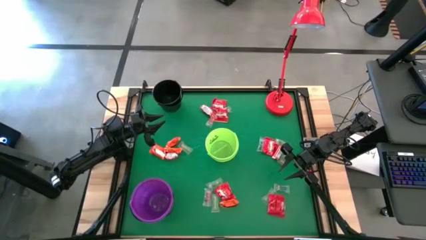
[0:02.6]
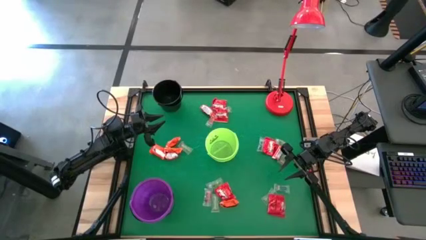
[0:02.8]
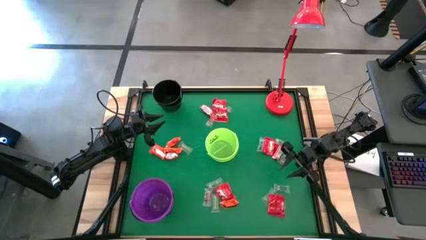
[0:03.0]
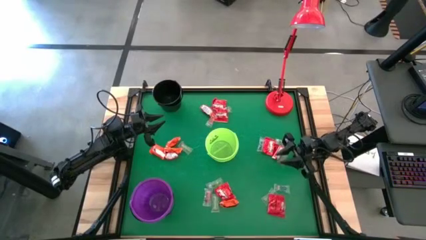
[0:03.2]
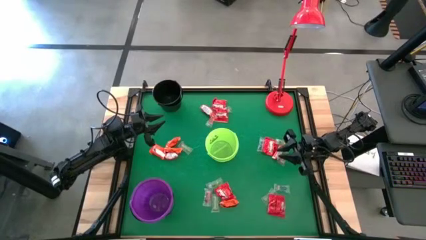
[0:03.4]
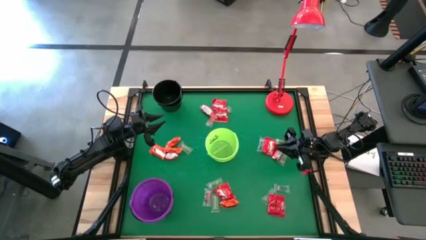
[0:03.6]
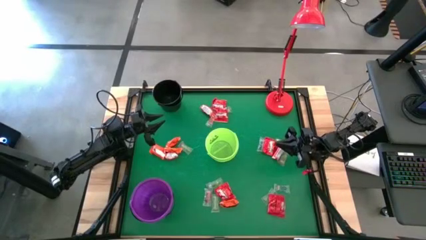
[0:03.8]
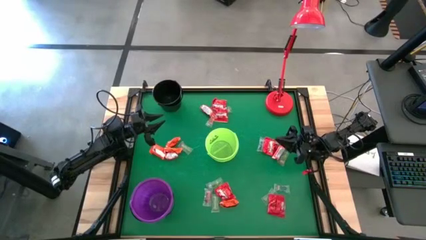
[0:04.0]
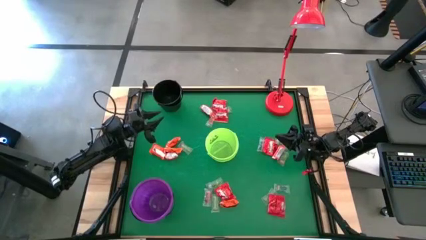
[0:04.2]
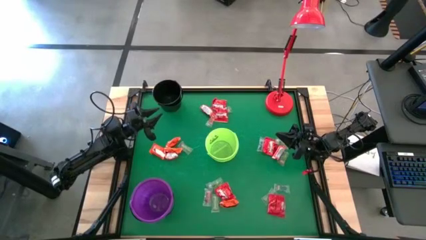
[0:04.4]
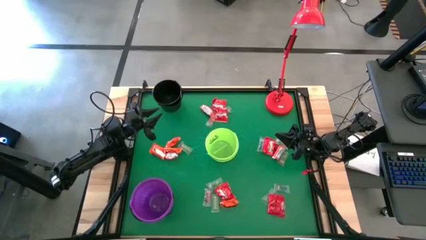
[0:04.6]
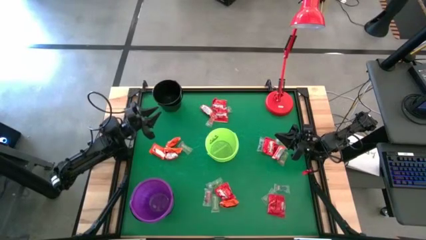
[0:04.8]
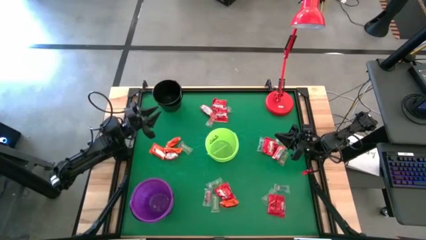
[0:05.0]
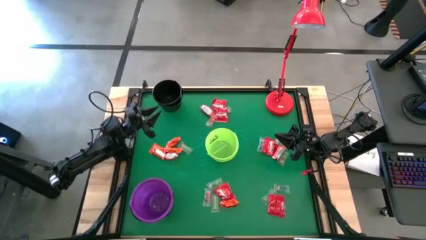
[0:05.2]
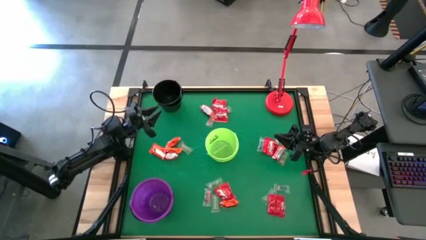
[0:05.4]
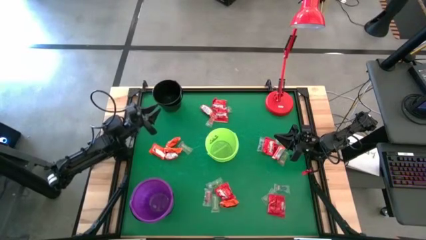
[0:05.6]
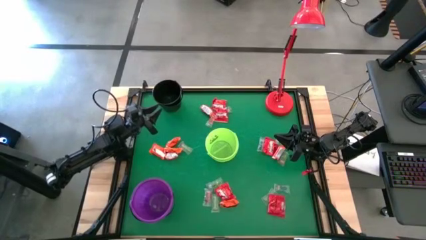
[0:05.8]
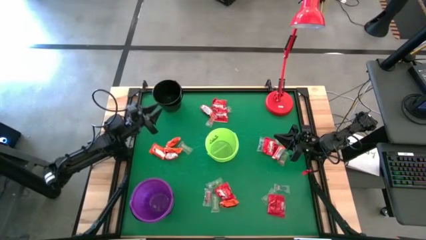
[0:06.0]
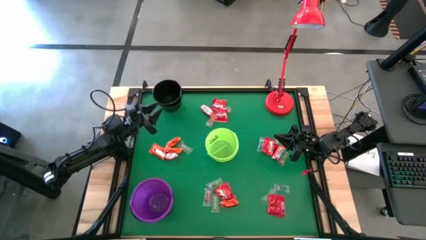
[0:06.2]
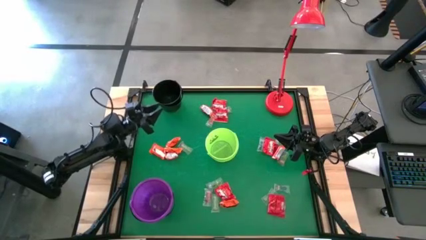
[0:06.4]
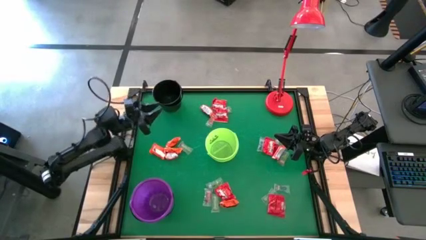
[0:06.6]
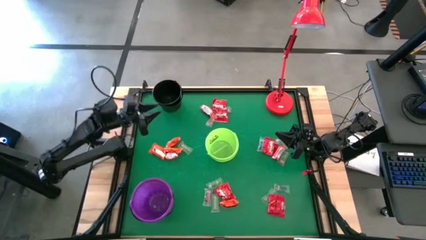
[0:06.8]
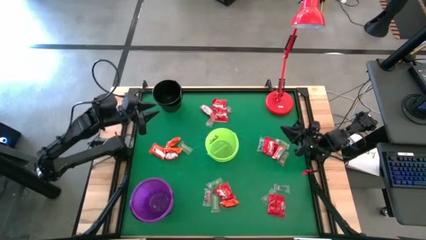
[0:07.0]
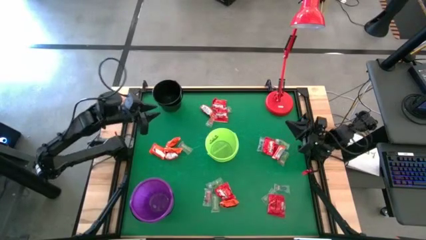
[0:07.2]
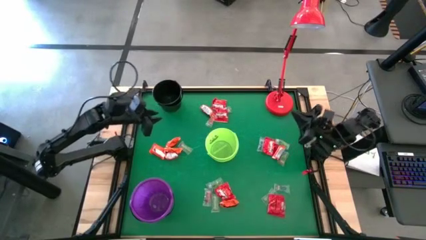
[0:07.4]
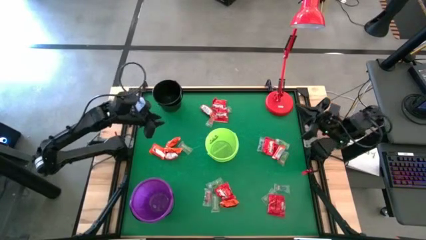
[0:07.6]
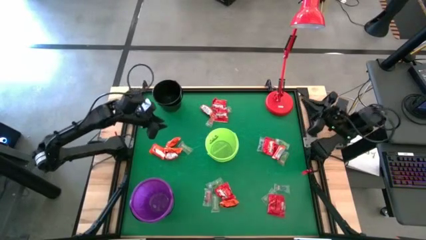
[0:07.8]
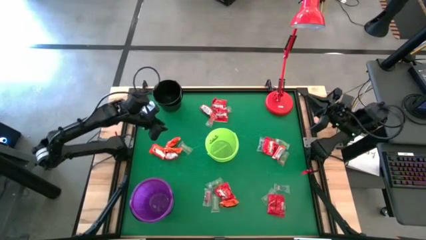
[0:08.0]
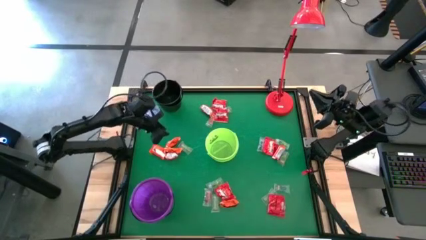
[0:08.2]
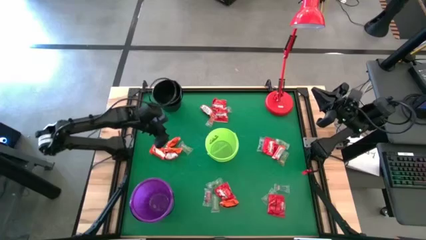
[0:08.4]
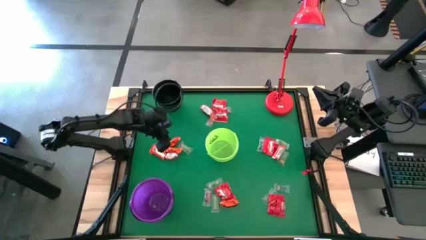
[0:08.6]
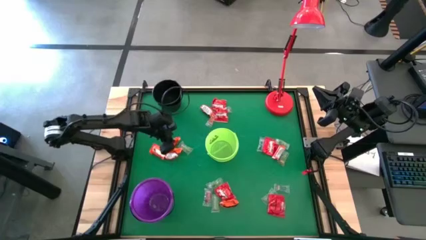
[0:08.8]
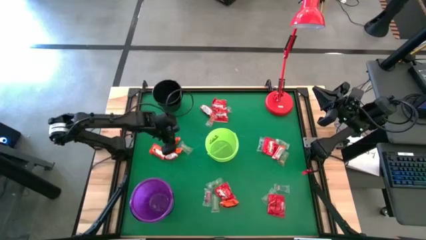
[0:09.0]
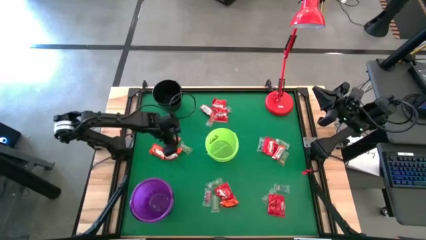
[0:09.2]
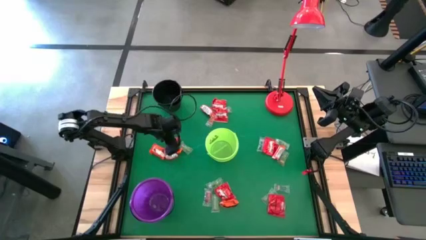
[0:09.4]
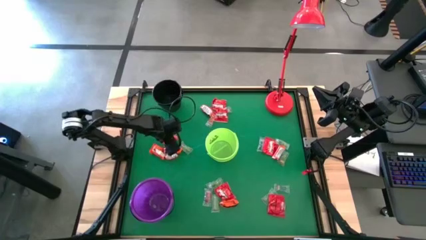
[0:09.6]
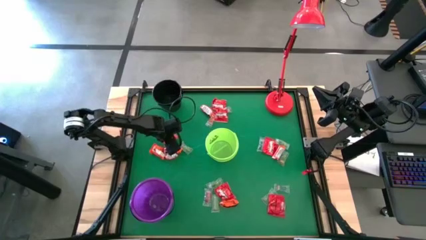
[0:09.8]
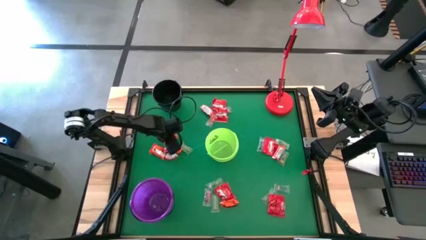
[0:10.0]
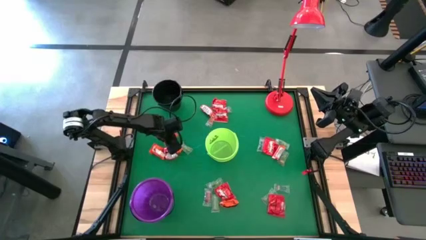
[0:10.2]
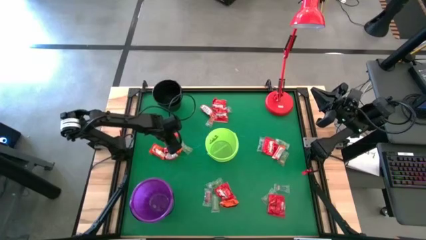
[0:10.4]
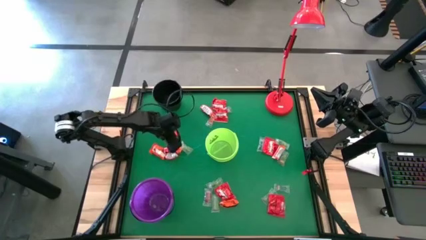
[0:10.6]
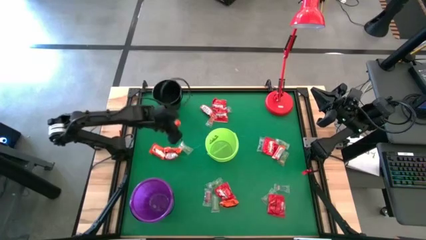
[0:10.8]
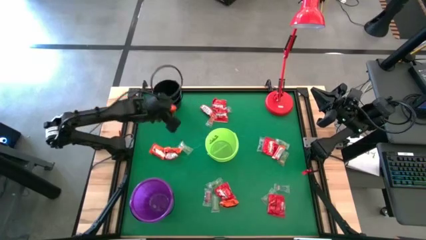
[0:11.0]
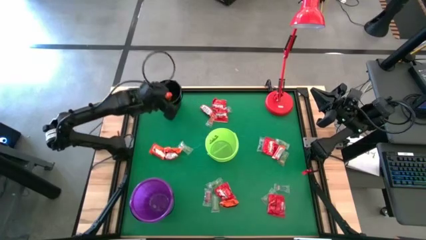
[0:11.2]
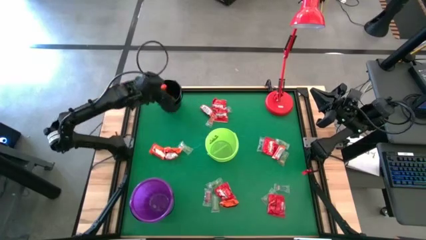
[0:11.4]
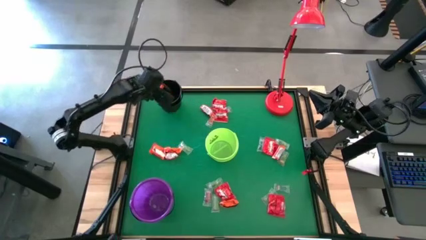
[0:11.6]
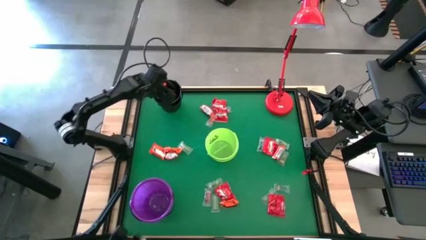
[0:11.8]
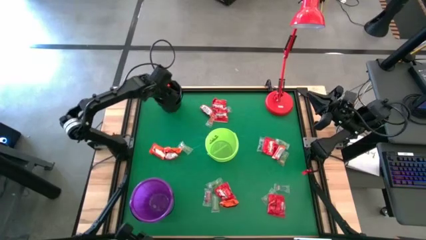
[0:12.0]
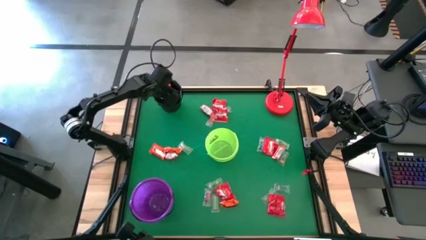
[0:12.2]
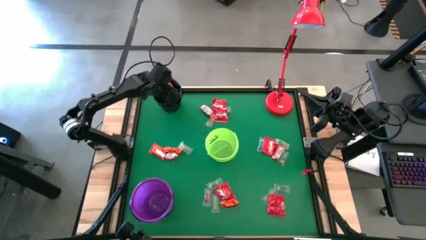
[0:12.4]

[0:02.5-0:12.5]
Task: Sort candy
Put the orange chocolate into the black bucket

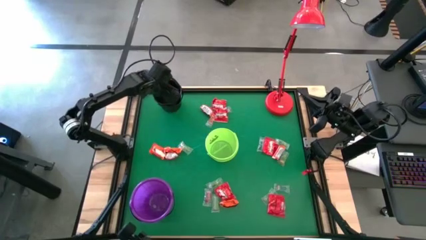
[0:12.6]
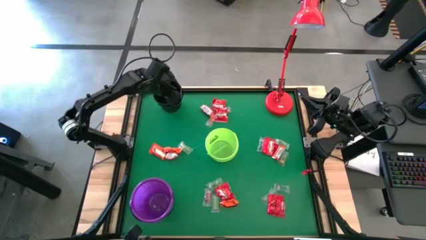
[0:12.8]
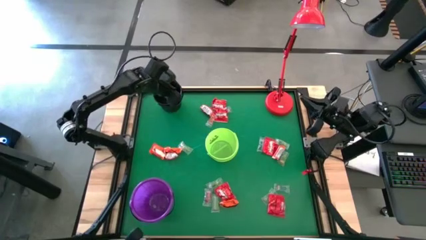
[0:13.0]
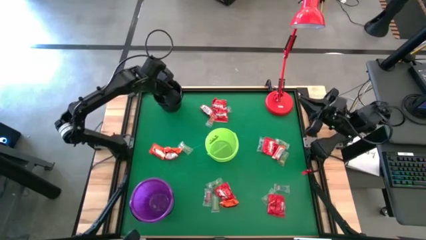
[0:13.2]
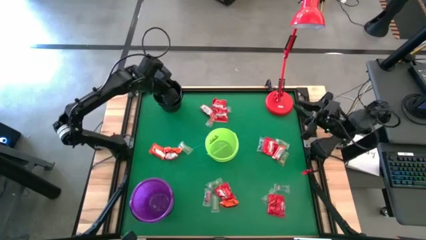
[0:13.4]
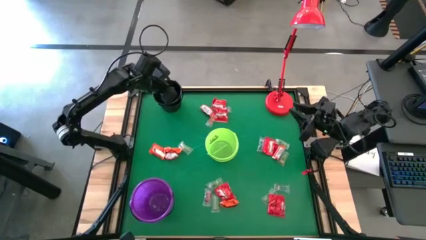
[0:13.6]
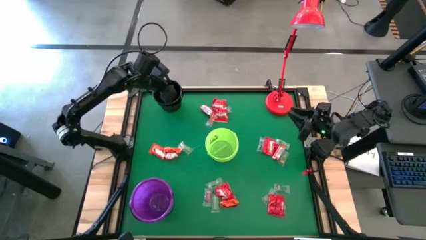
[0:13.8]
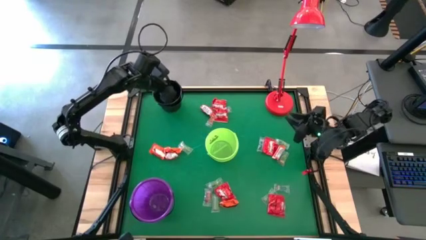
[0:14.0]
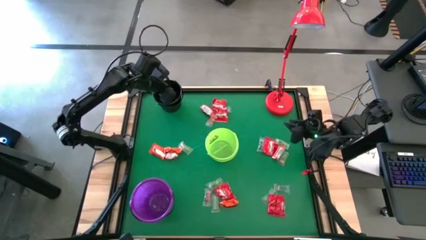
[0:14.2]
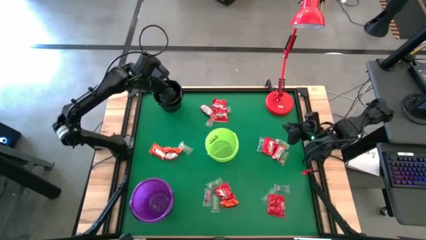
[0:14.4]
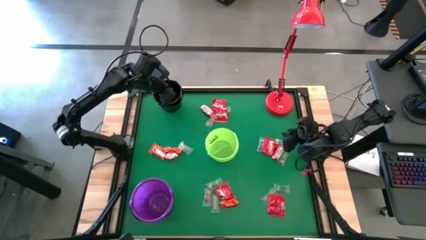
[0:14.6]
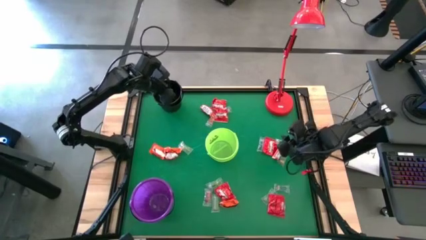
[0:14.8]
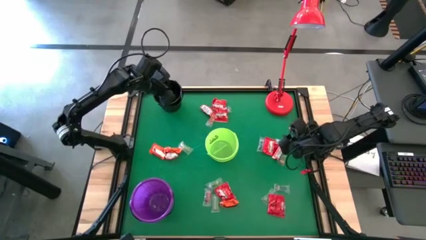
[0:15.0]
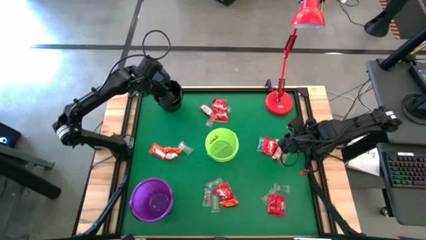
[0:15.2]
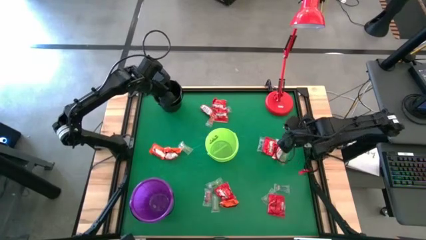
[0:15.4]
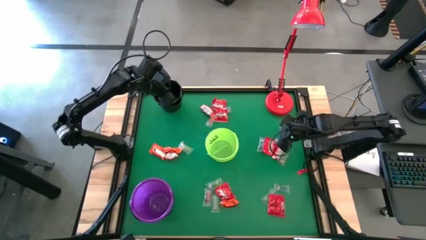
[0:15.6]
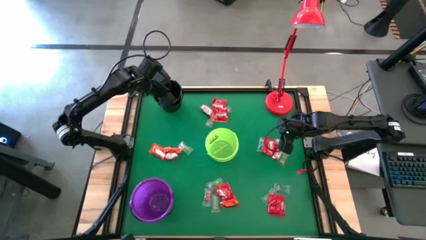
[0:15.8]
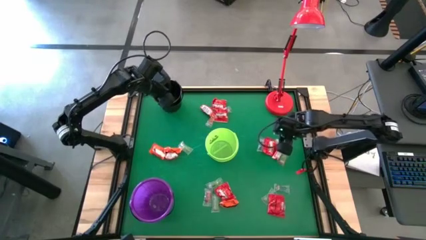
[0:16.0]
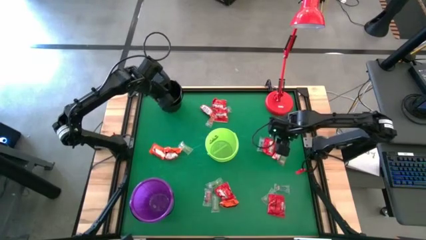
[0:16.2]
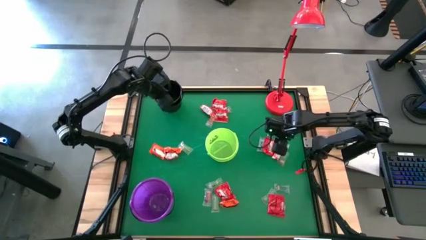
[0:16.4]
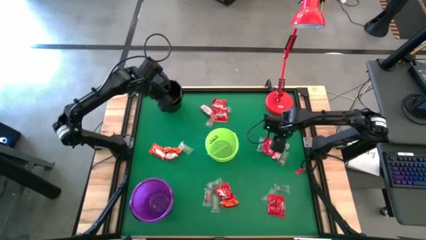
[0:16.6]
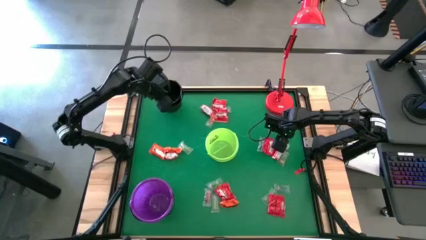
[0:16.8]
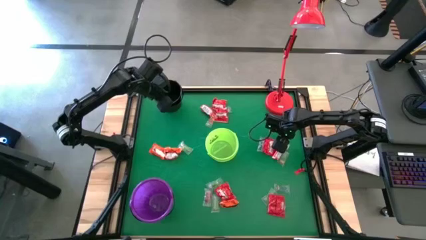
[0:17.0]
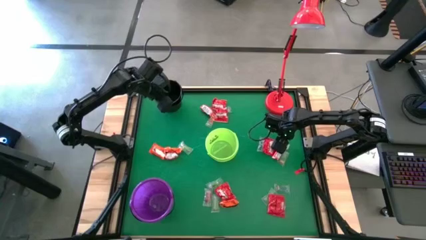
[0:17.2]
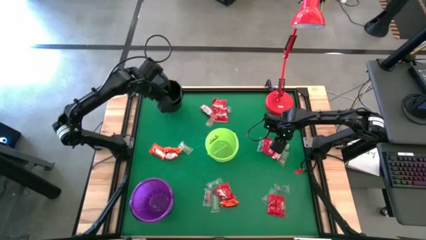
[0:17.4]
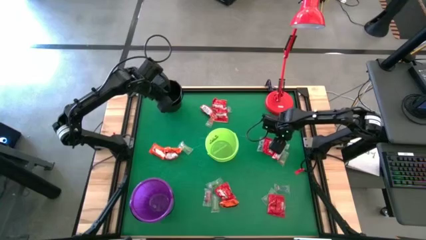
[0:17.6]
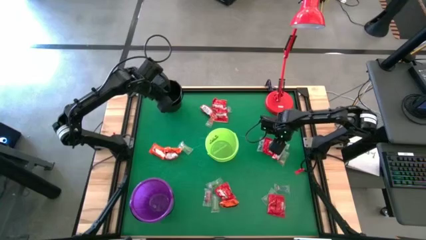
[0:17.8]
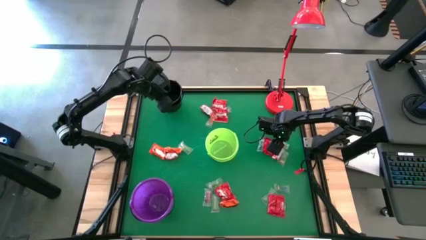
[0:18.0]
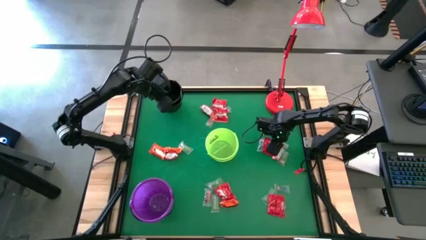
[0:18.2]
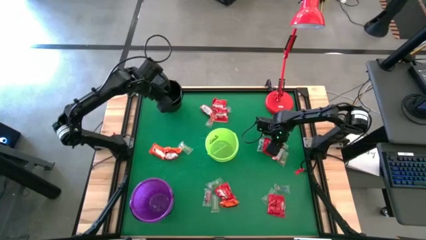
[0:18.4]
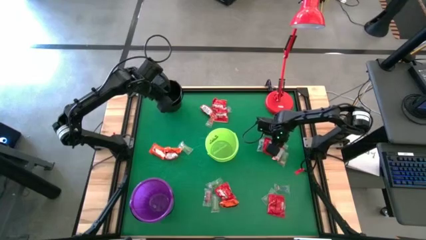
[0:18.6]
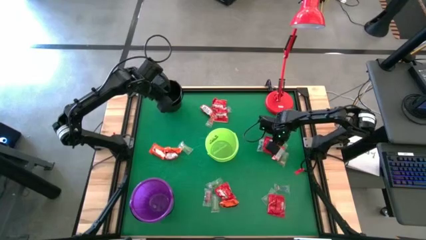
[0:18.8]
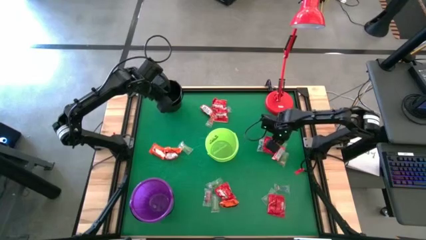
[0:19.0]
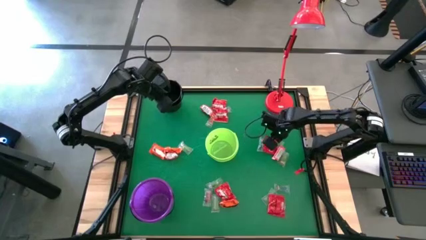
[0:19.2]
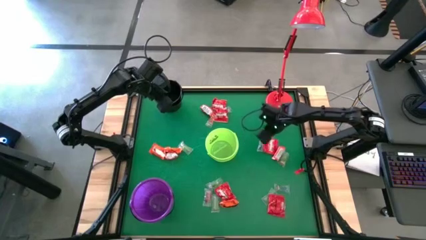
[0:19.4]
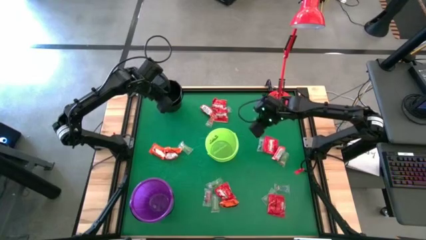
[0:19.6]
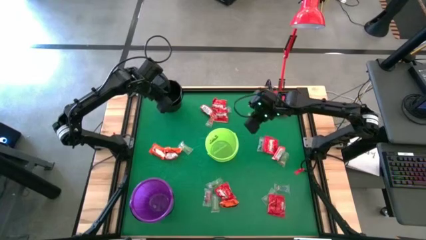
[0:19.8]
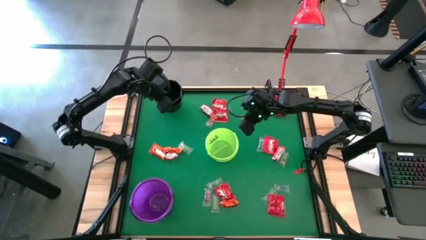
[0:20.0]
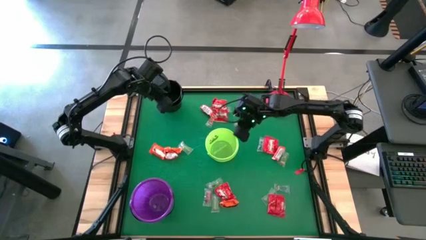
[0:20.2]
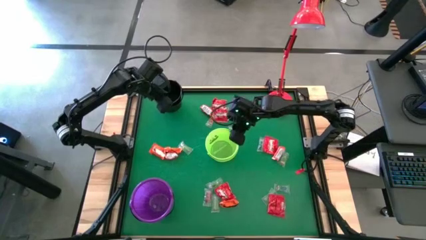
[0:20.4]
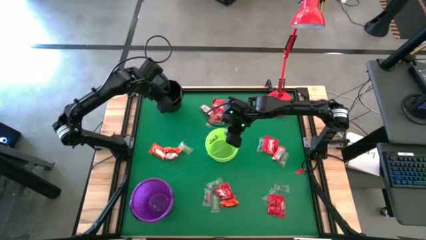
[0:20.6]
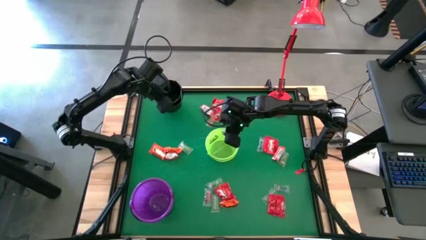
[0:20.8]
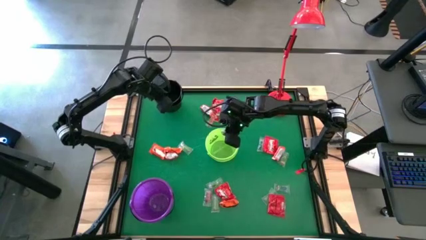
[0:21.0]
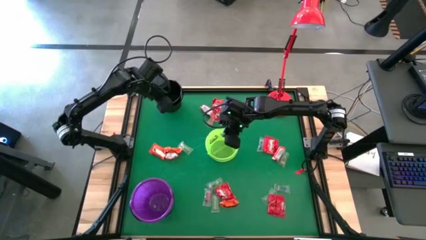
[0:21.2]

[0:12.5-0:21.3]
Put the green gummy into the green bucket
